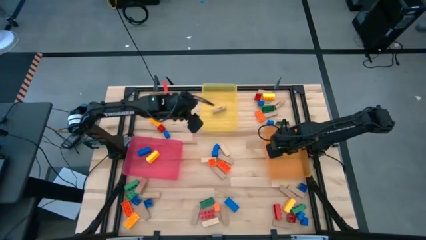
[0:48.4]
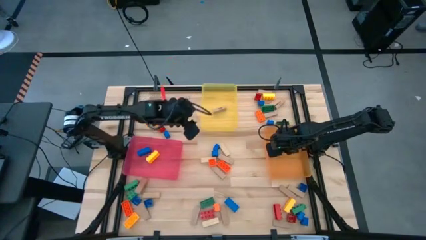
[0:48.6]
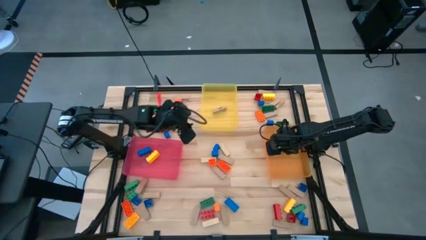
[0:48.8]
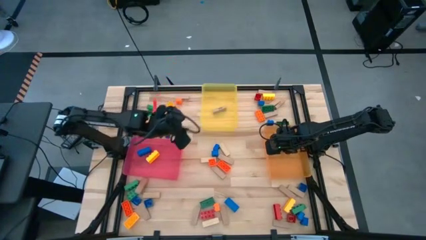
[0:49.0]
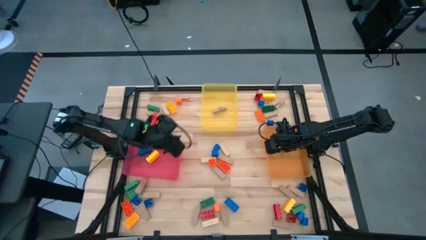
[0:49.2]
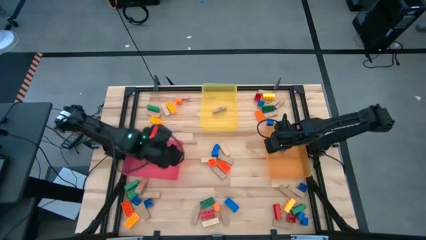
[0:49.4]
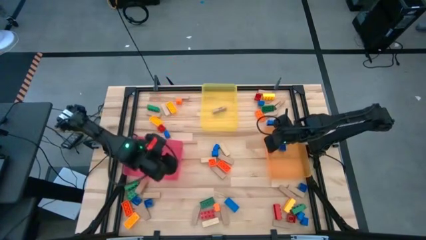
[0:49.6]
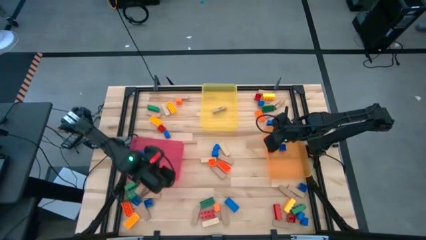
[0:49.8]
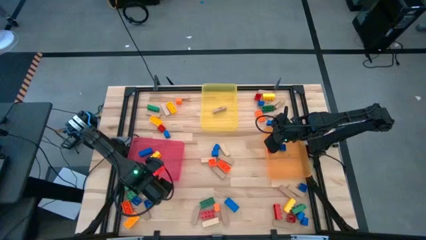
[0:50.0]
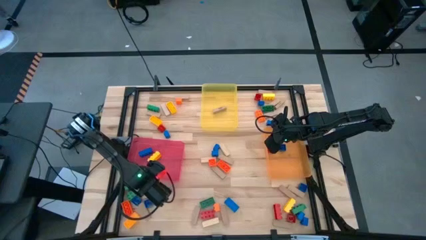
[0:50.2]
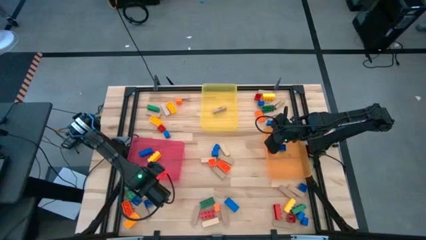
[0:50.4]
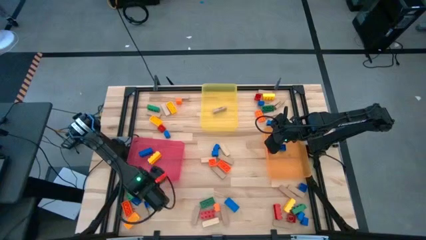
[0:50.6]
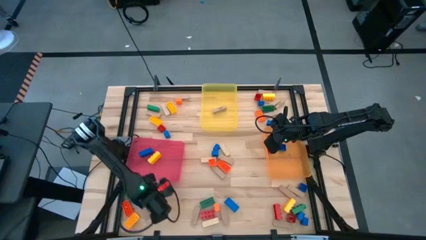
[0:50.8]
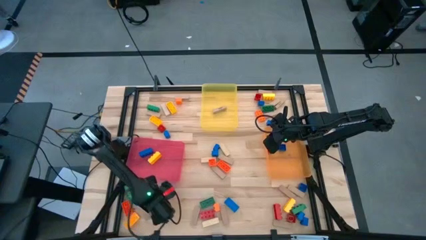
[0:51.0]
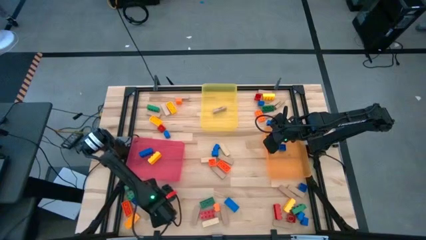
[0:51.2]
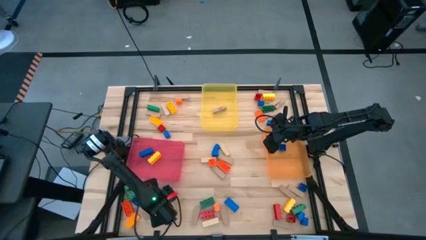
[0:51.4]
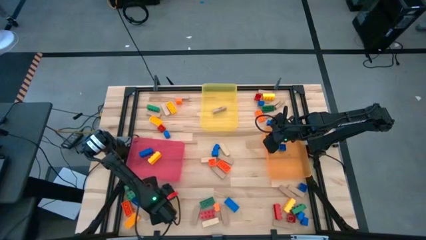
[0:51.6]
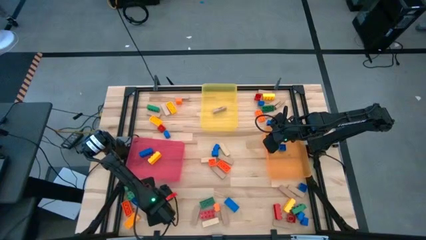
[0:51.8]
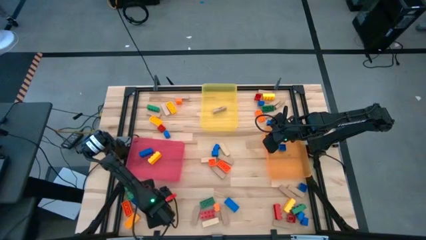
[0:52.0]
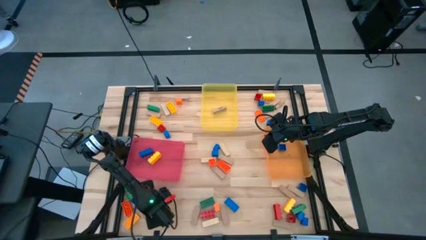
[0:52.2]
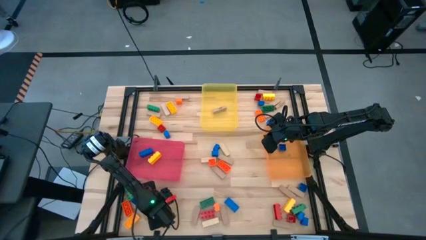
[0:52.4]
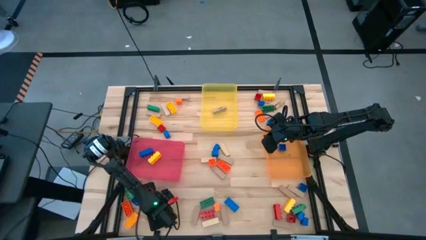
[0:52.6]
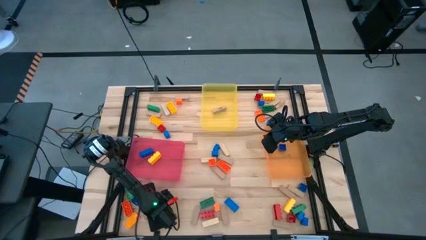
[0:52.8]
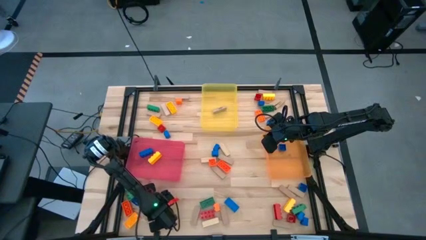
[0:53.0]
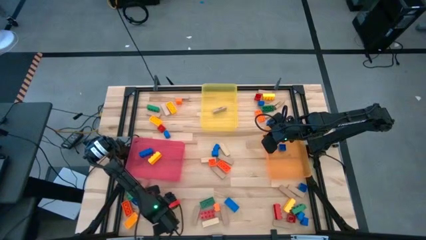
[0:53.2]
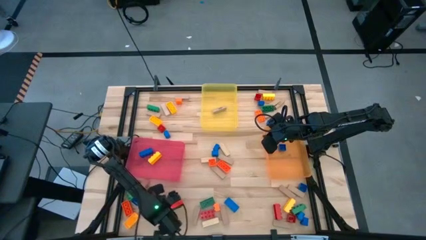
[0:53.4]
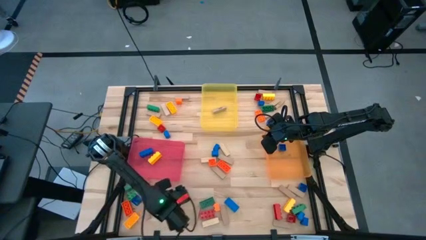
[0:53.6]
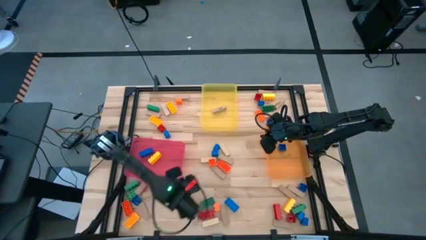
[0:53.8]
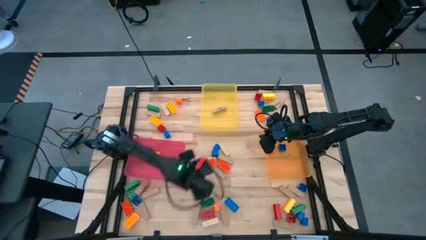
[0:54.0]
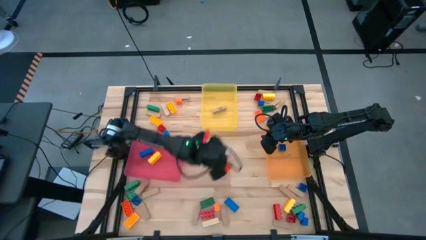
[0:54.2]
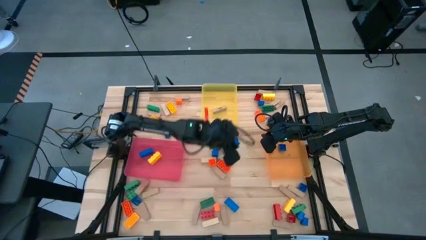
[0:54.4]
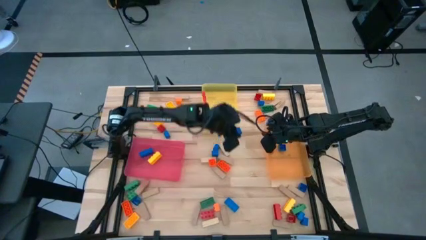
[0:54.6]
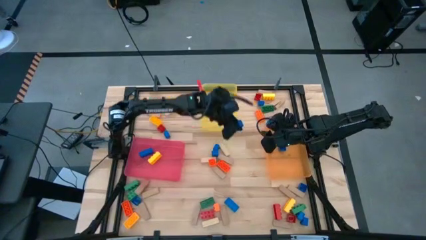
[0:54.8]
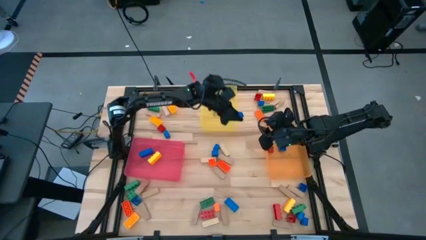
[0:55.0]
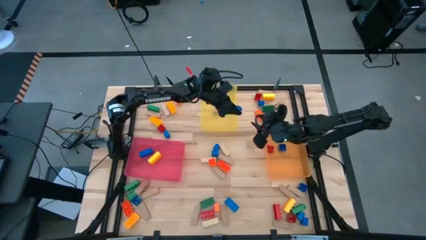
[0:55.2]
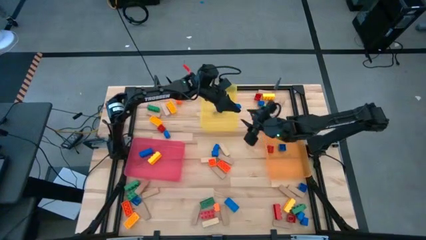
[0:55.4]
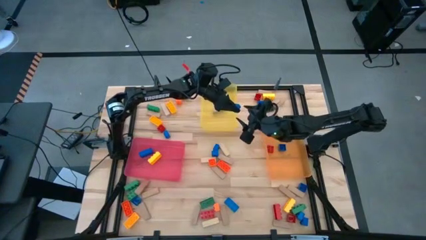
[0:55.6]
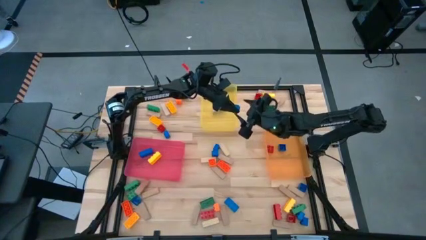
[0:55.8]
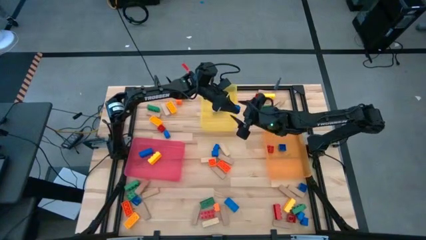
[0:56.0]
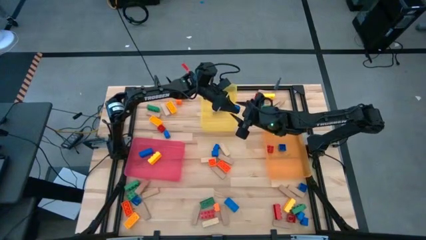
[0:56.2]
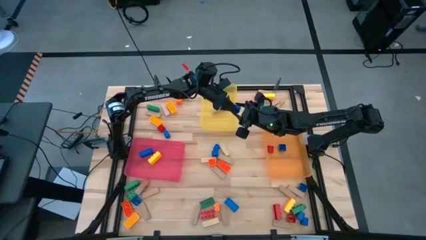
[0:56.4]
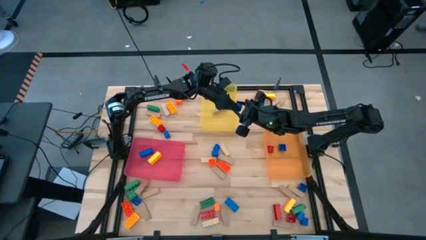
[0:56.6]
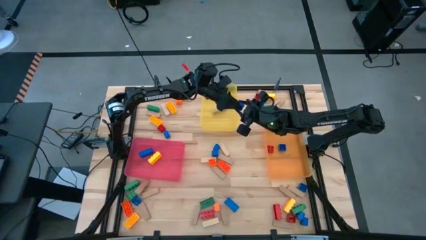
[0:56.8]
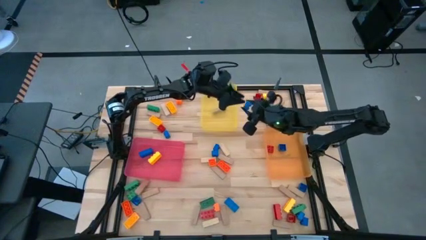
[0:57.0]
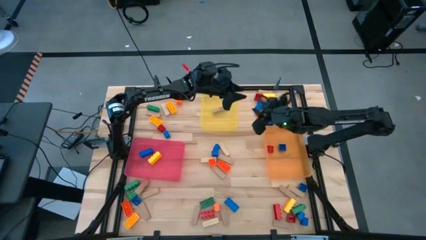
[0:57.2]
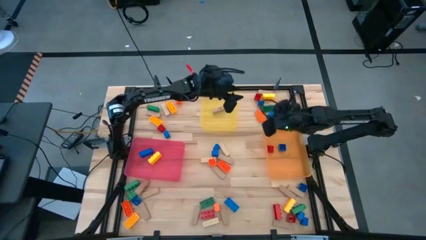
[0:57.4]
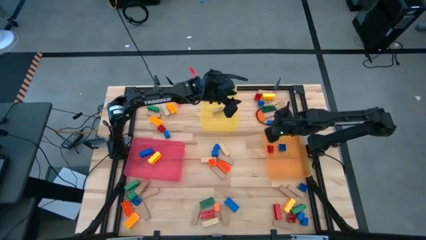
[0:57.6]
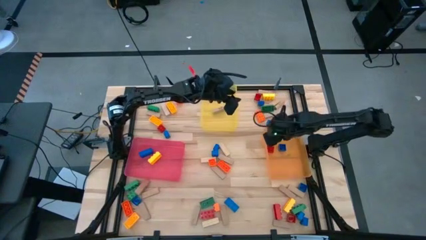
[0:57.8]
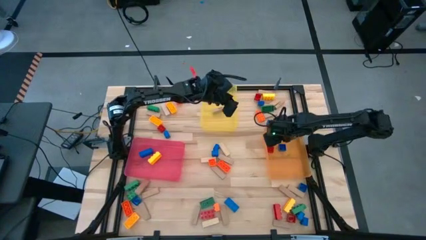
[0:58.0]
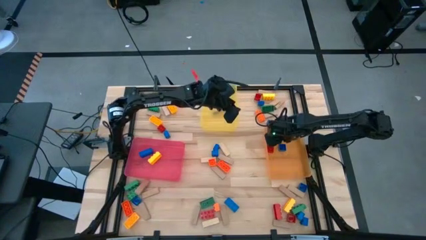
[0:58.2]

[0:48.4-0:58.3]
Task: Sort blocks by size
Put the 1 stud blue game piece into the orange bin

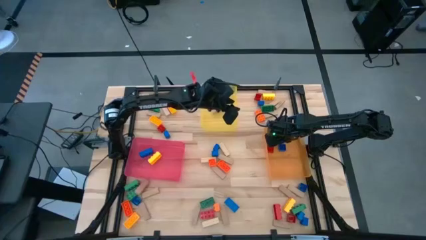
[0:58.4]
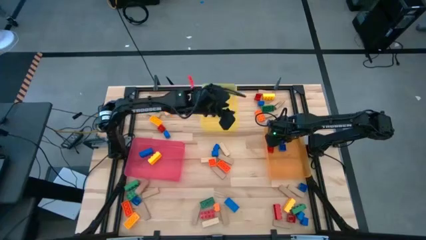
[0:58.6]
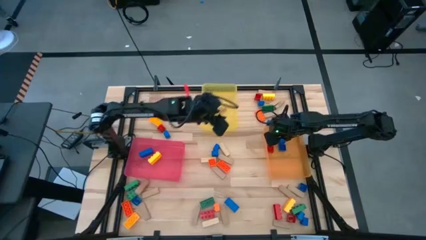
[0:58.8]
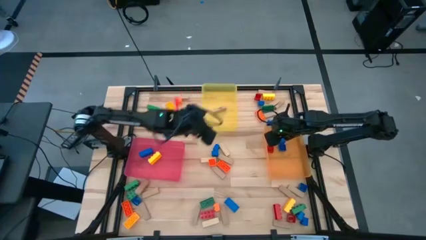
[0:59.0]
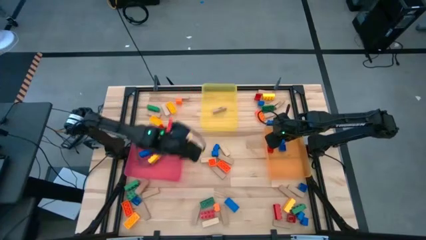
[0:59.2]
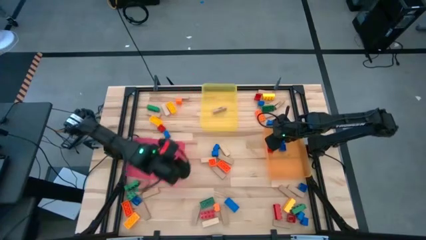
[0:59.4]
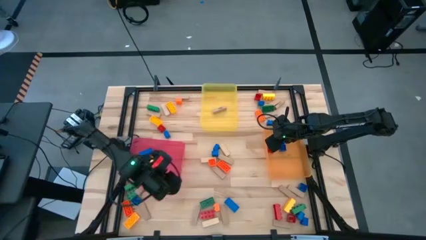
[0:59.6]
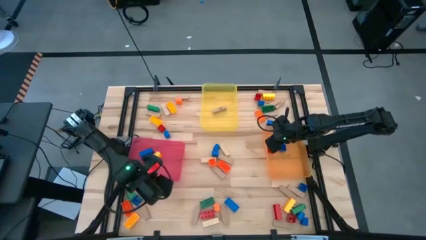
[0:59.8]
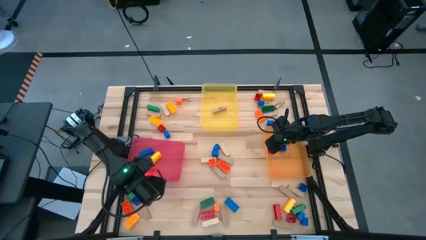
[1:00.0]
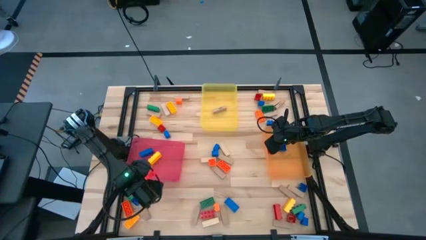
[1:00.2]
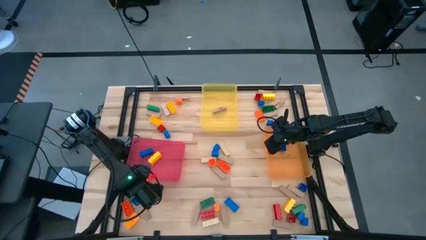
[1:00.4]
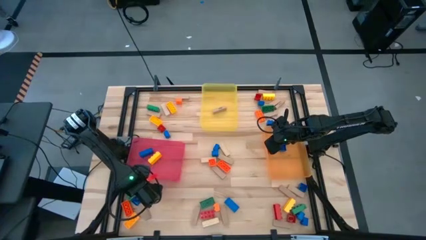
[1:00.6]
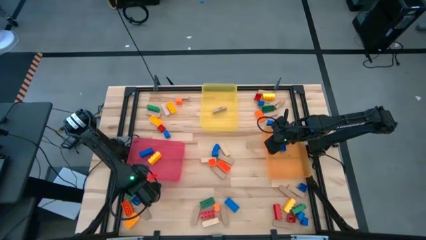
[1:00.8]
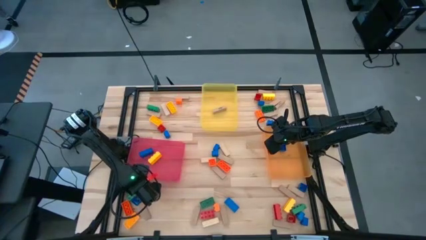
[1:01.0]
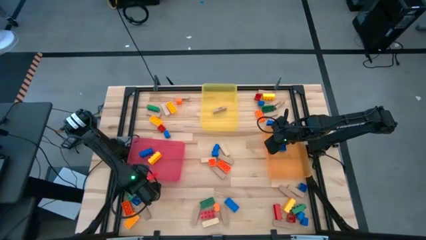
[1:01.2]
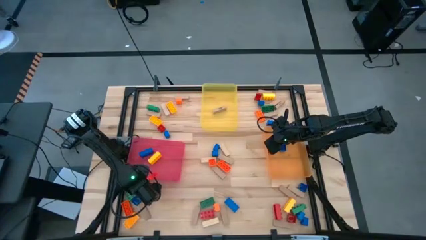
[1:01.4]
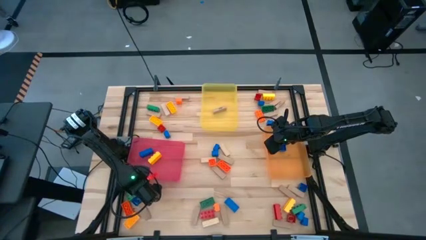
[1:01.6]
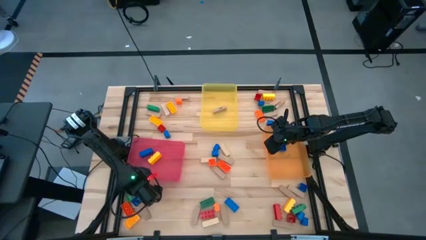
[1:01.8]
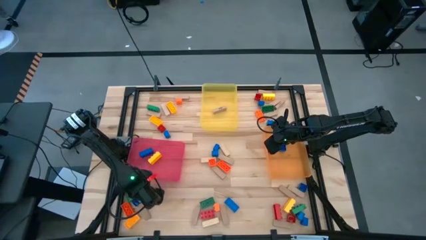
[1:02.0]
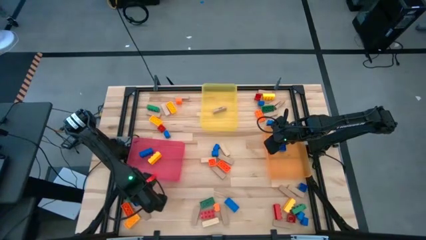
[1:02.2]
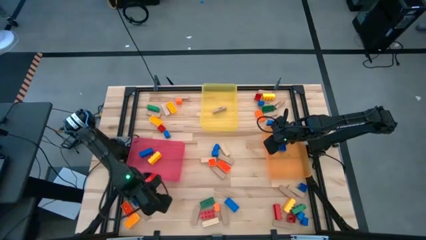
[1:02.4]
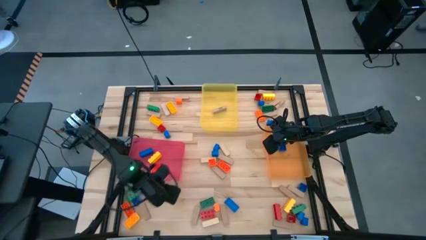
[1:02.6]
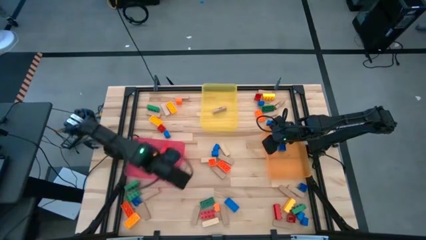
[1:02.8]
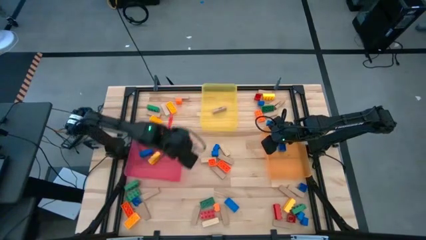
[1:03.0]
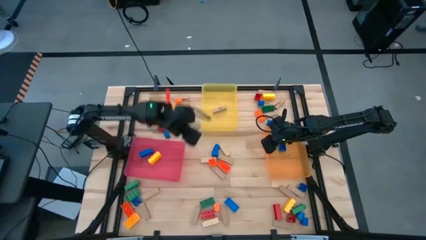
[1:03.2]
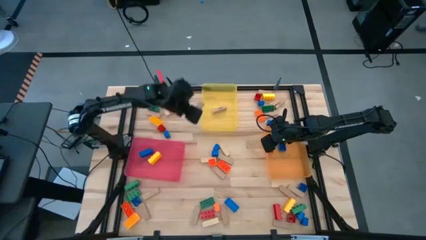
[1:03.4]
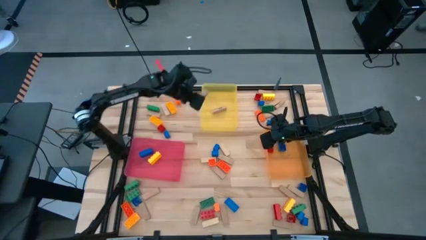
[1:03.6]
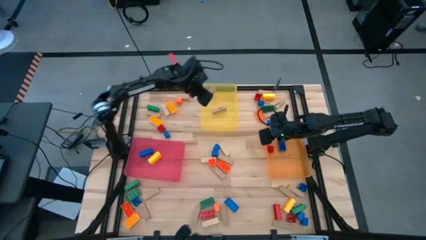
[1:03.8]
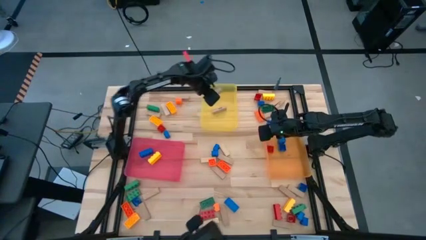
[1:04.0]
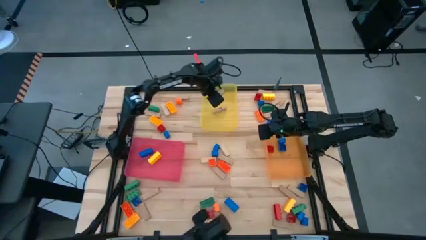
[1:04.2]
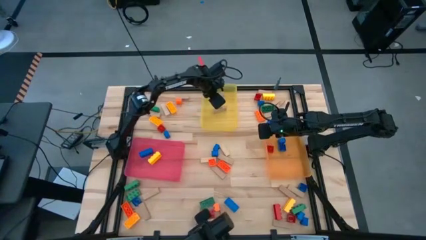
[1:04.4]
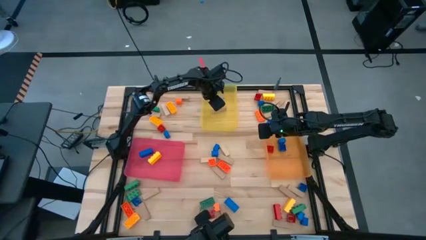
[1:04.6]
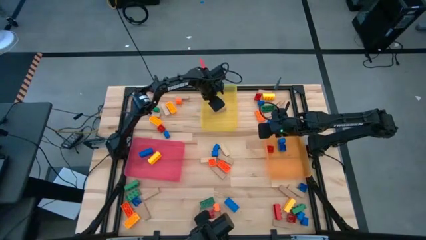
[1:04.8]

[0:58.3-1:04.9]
Put the wooden block into the yellow bin
